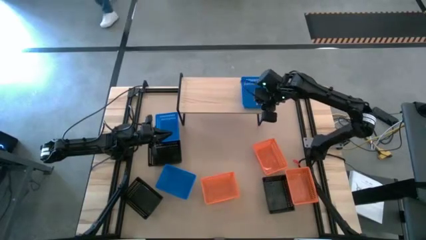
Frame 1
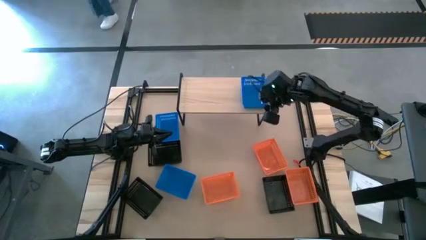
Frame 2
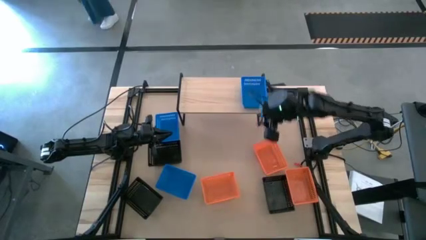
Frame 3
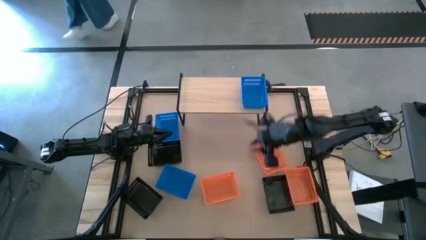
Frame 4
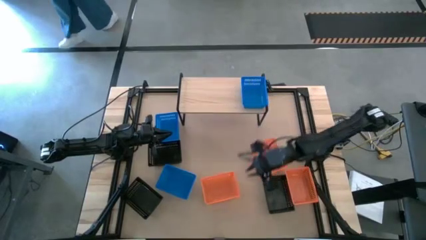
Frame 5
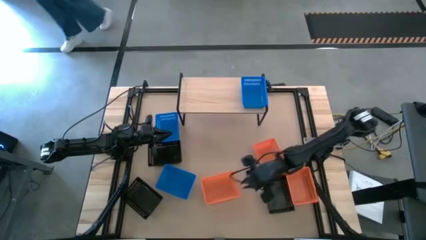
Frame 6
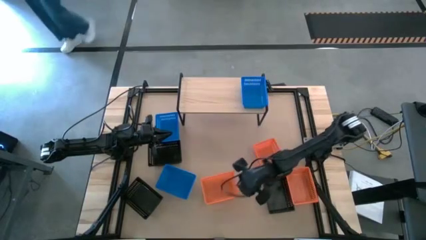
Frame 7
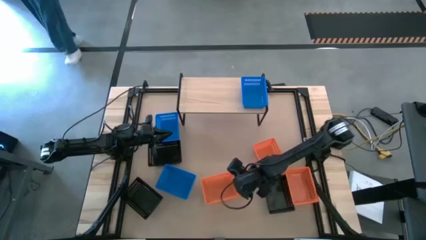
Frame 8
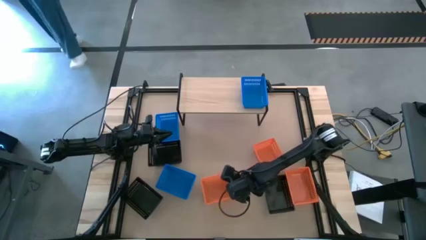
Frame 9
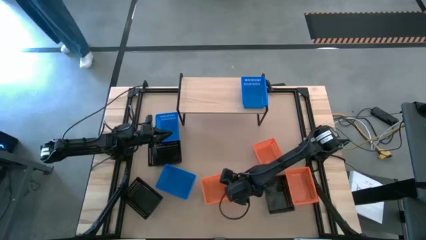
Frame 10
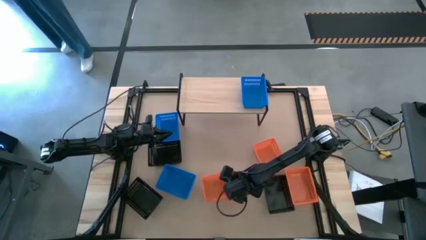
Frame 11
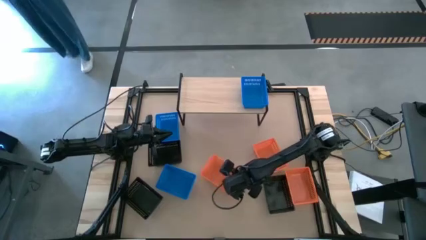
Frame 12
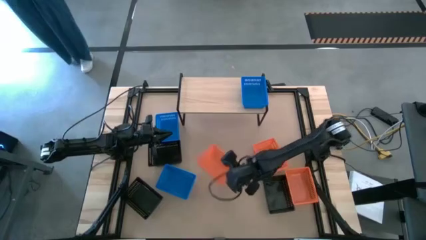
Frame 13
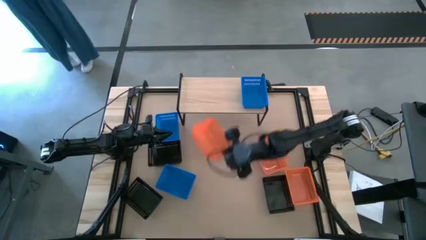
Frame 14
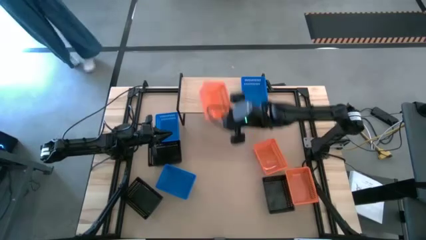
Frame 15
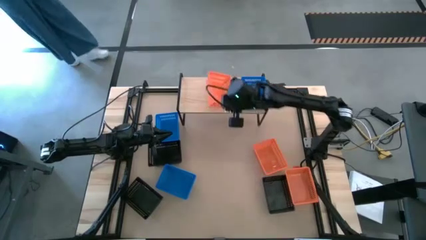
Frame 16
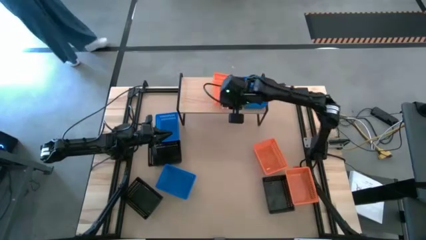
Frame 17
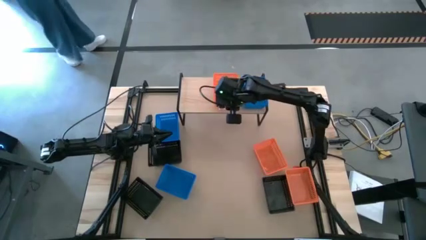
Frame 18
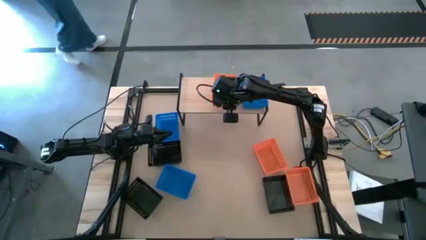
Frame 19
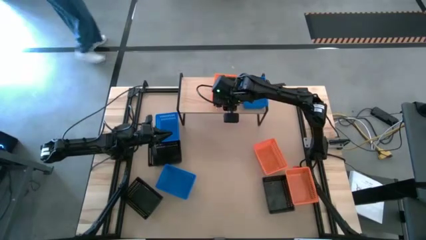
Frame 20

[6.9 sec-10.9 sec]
Task: Stack baskets on shelf by color
Put the bottom left orange basket on the shelf

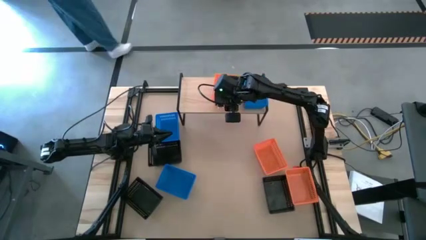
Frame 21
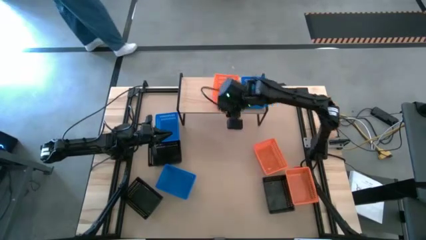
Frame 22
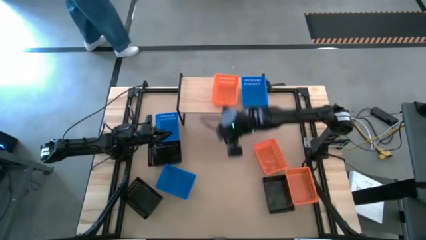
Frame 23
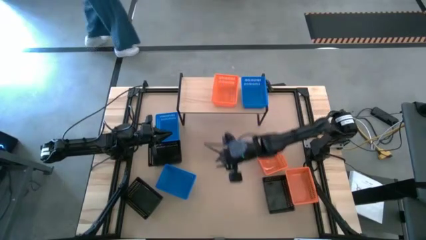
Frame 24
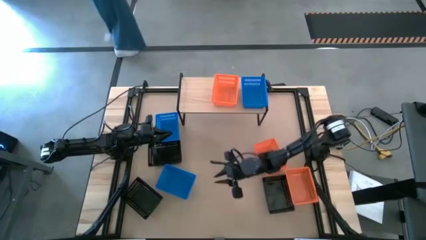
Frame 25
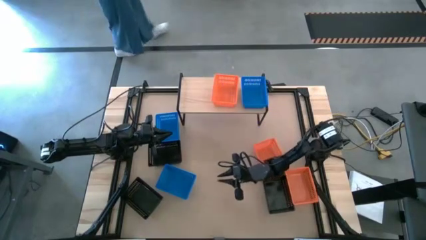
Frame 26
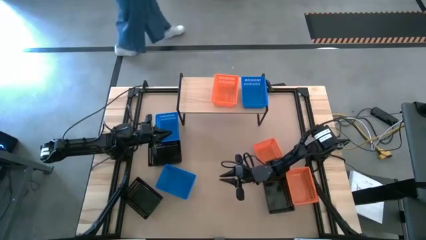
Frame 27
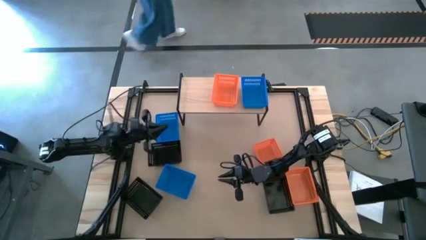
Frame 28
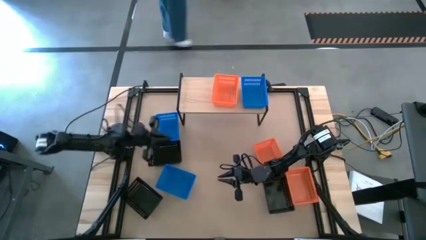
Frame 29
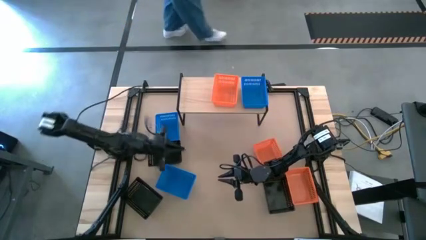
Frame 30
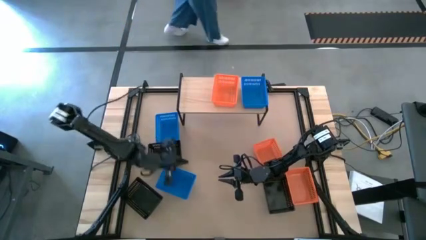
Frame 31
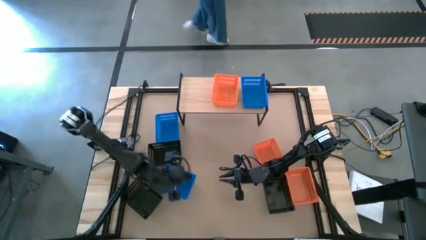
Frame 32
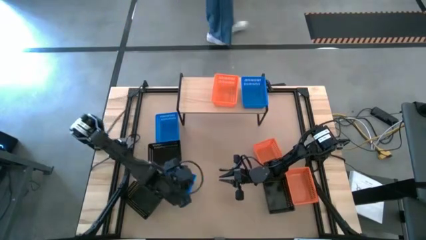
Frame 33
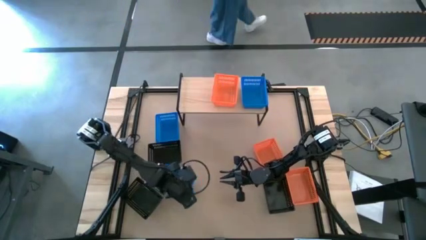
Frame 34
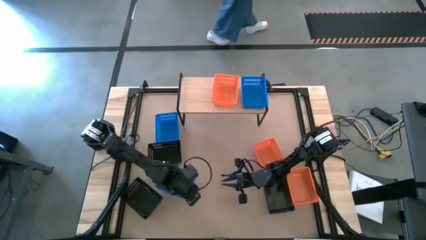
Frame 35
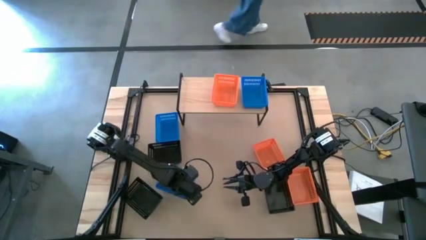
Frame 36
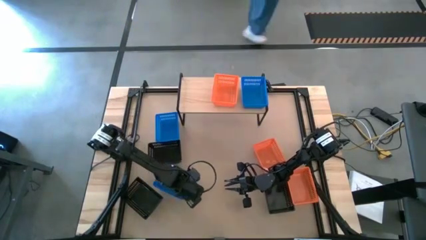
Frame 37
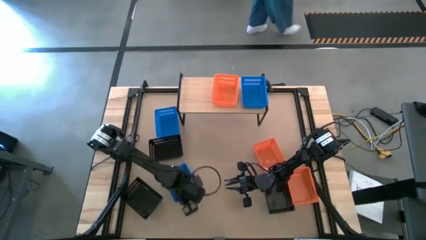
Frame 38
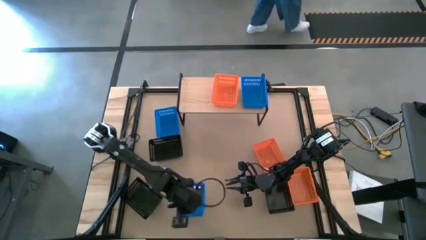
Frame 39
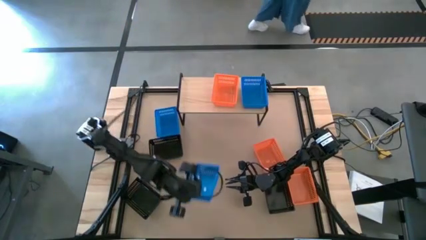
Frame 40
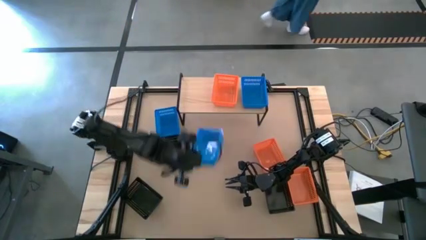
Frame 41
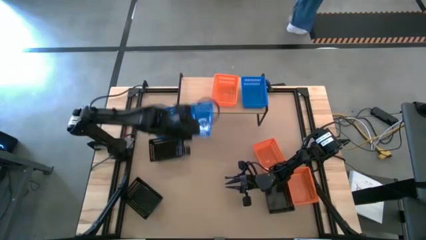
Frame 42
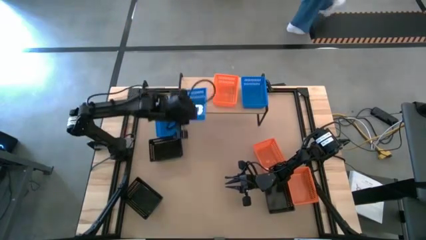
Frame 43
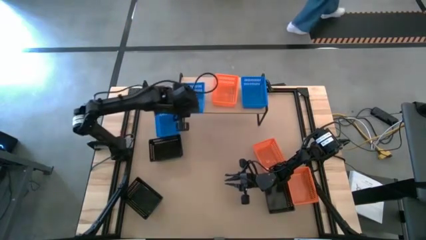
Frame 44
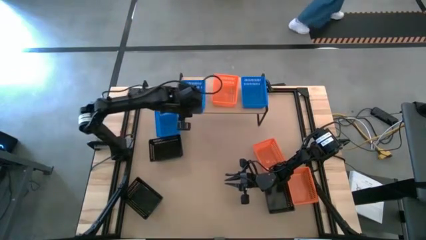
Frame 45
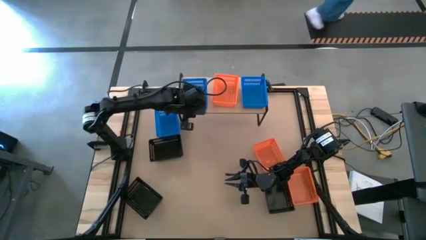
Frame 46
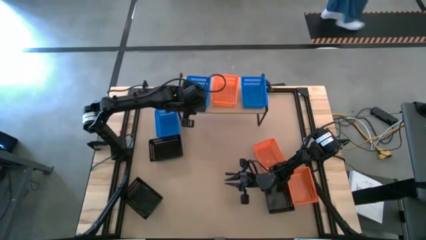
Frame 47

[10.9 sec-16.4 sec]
Put the bottom blue basket on the shelf

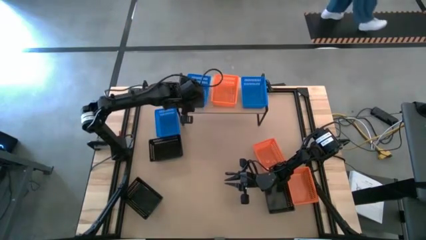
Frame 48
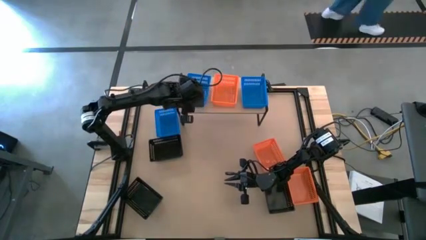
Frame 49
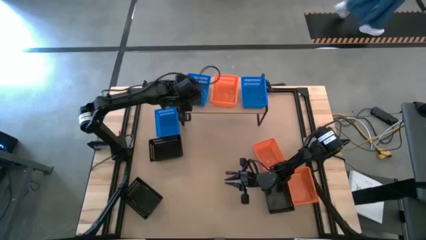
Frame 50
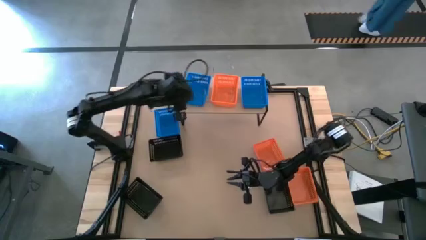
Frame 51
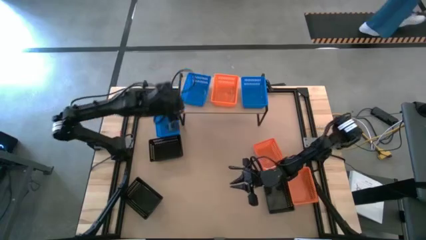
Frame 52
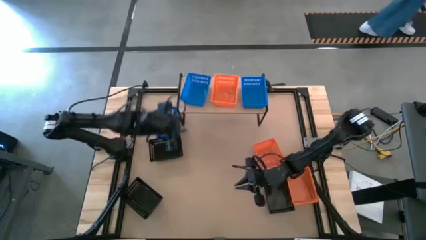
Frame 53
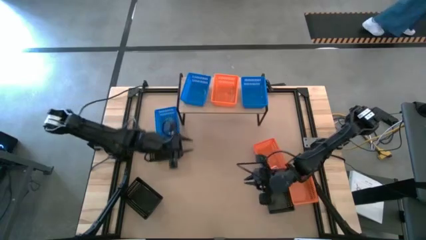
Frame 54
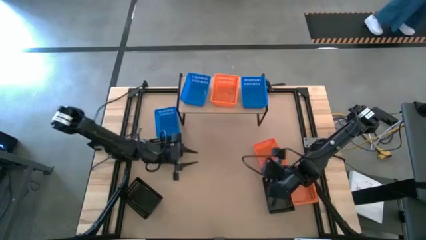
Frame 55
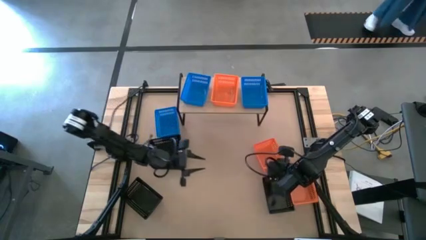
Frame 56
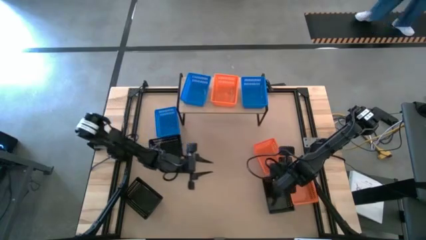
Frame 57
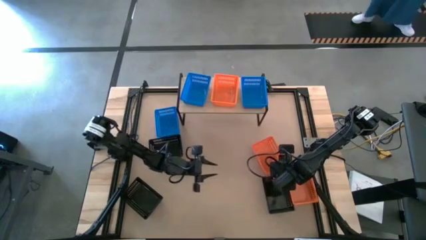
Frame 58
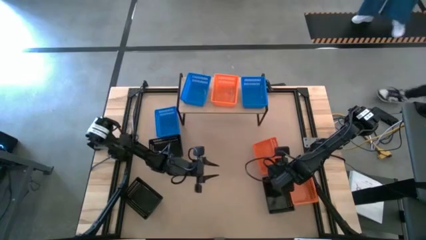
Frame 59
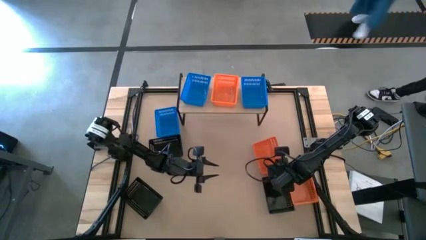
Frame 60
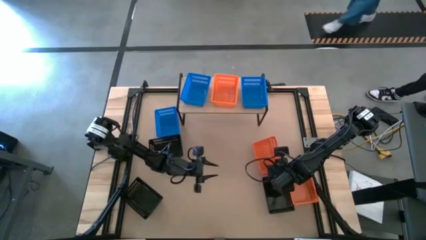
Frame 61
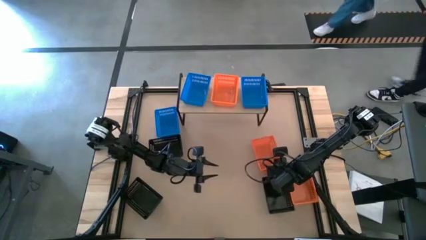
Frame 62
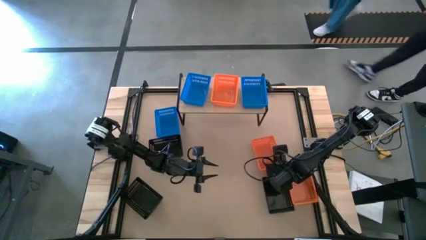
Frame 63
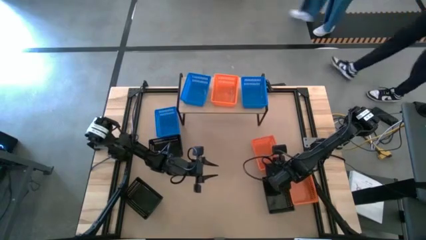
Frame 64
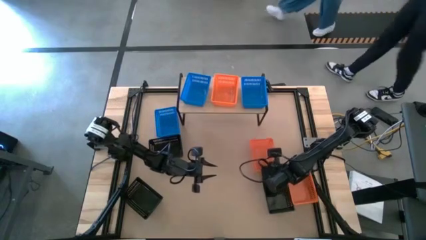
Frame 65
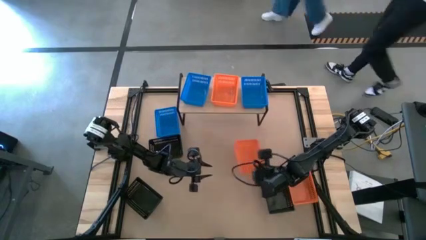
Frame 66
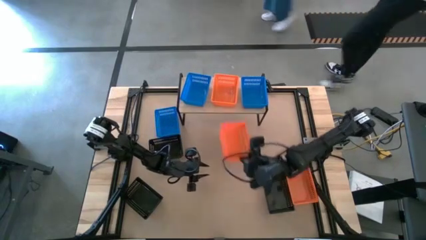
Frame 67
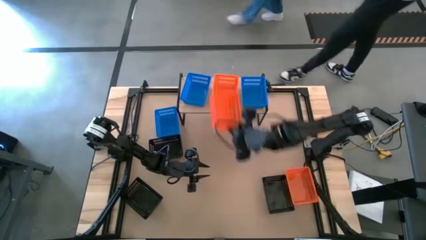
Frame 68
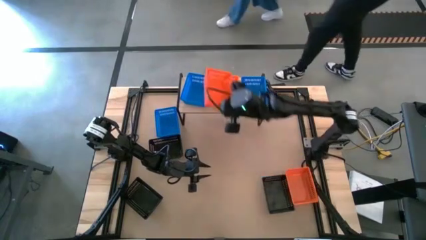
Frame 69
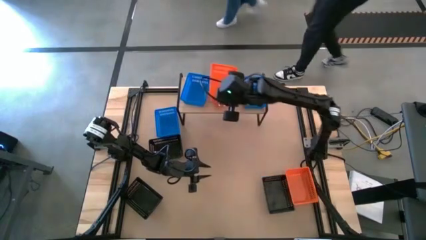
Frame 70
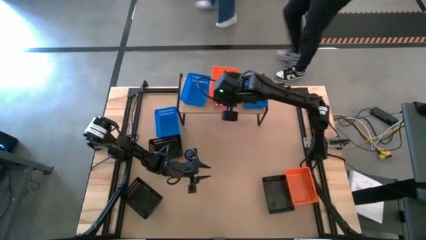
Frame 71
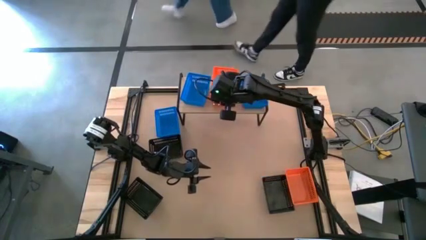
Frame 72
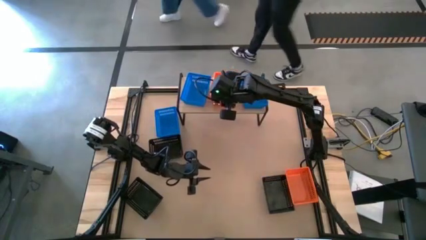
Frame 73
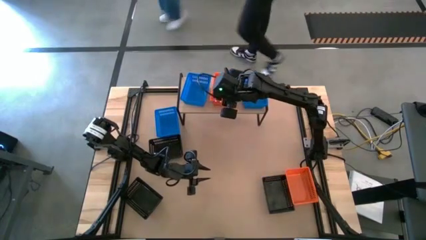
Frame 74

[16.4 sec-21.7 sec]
Stack the top orange basket on top of the orange basket on the shelf

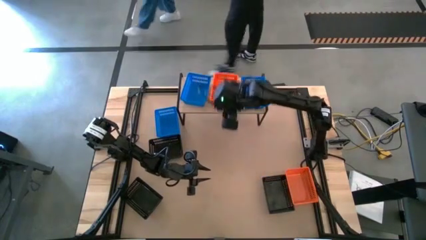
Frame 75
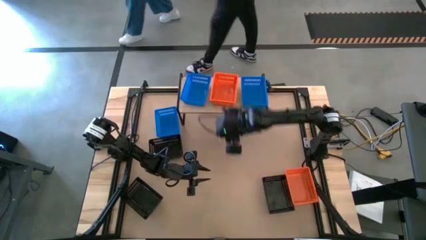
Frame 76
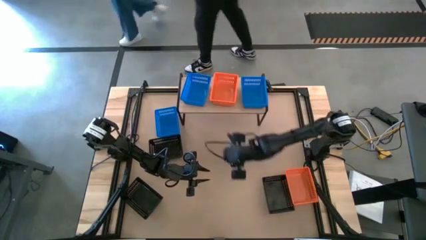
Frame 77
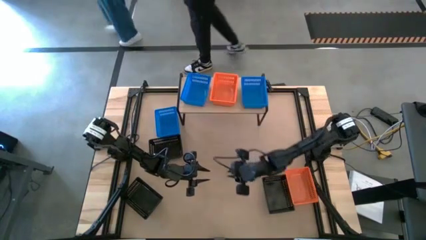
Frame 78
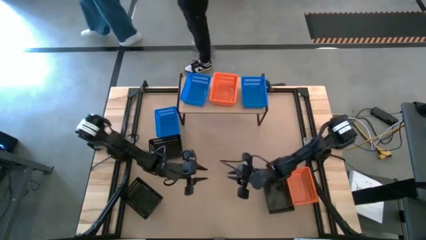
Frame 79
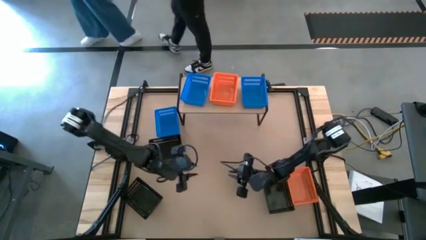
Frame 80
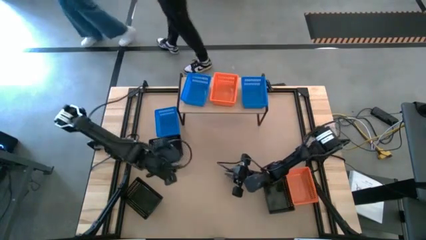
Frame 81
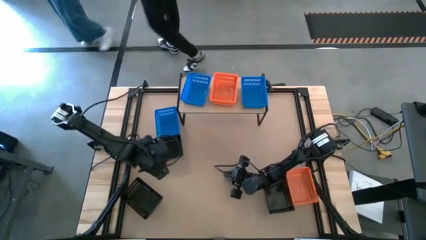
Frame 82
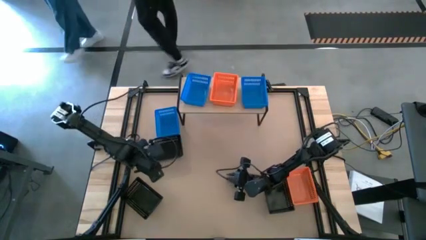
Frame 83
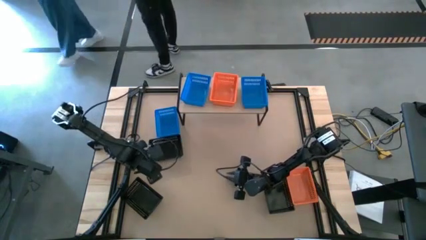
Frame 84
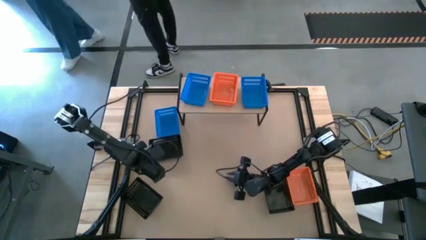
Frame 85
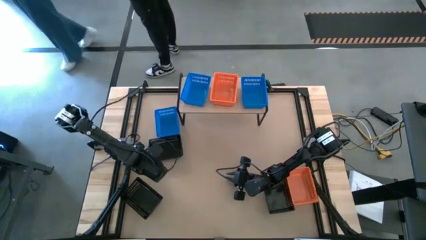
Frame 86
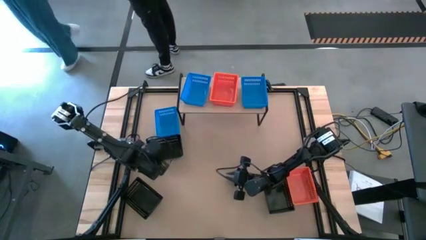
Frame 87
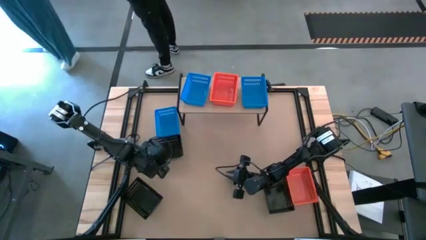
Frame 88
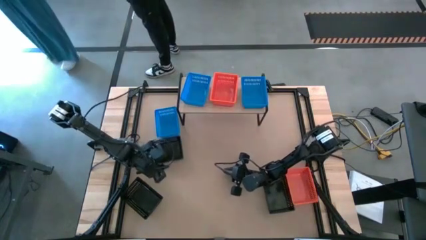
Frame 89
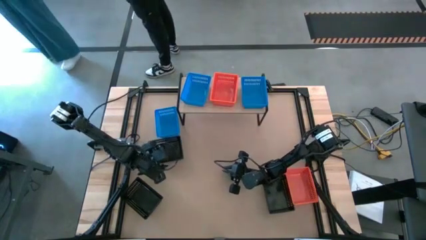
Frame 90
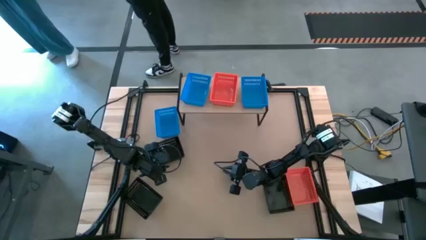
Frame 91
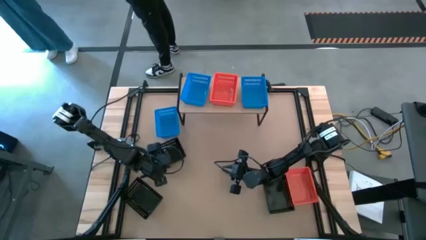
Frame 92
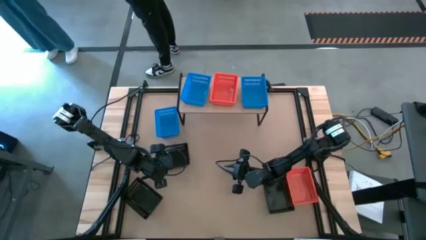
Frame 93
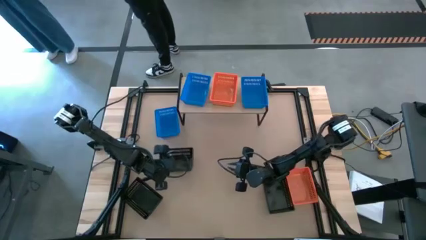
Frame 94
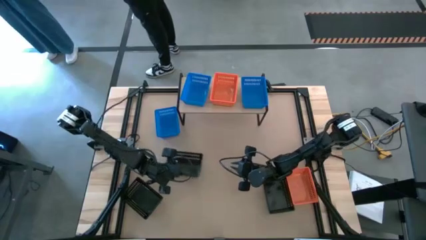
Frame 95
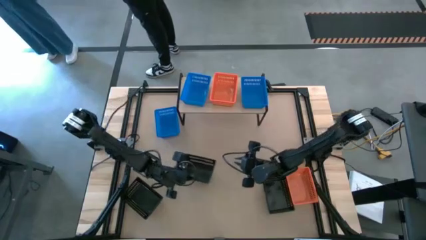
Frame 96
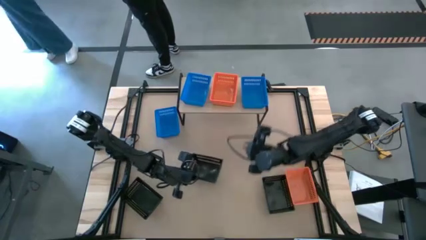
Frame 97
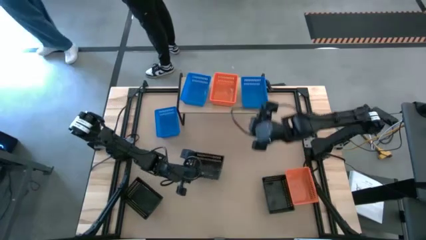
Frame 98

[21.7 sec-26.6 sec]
Move the top black basket to the middle of the table
